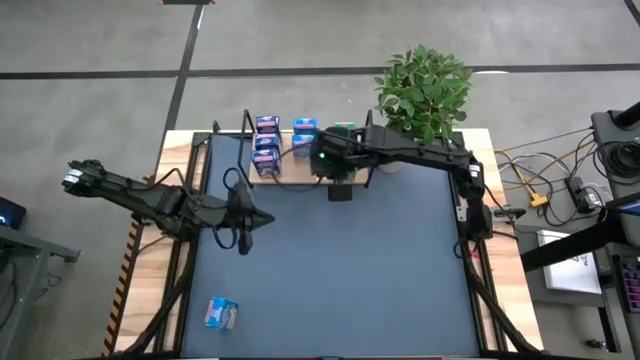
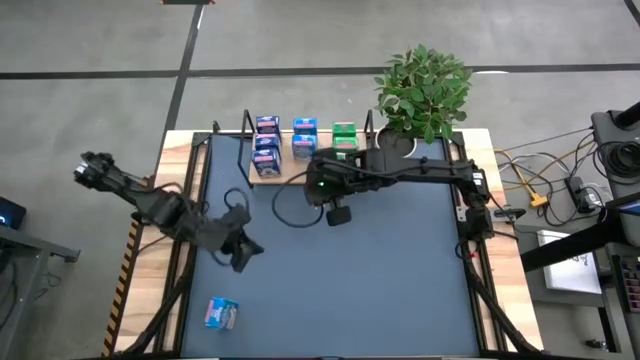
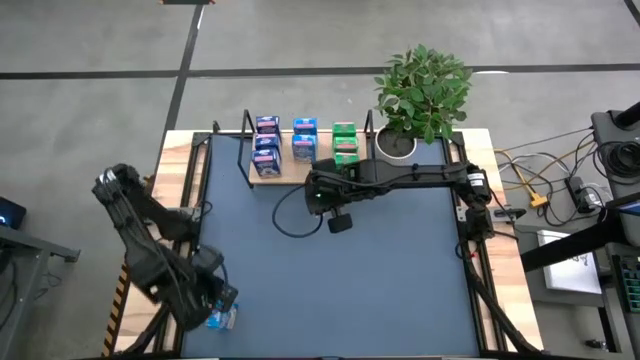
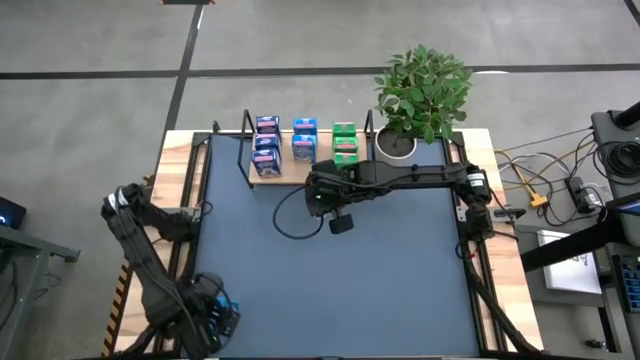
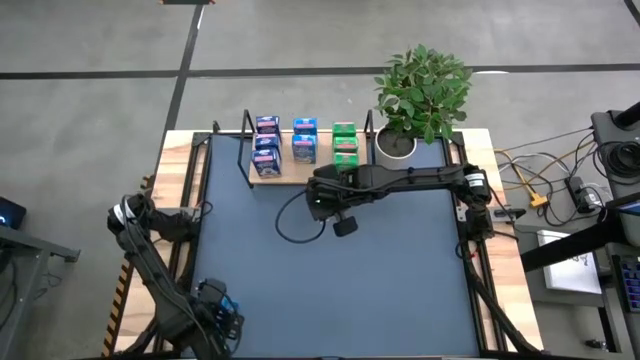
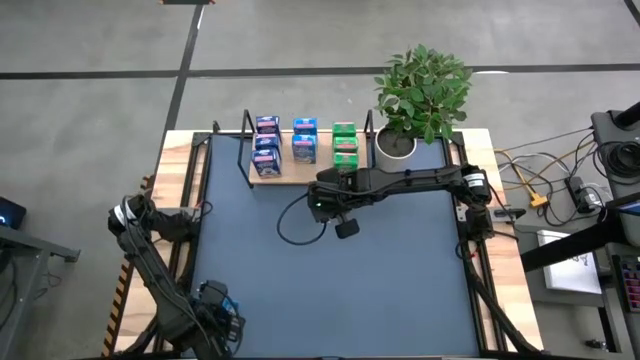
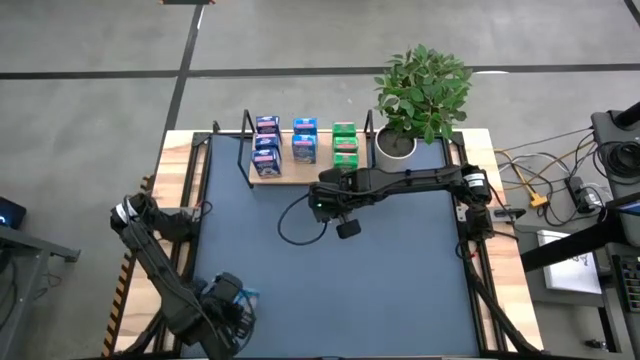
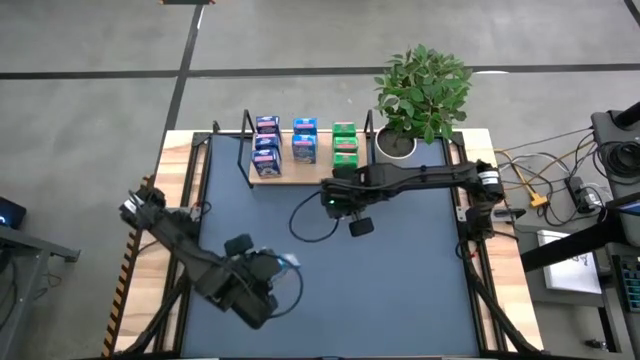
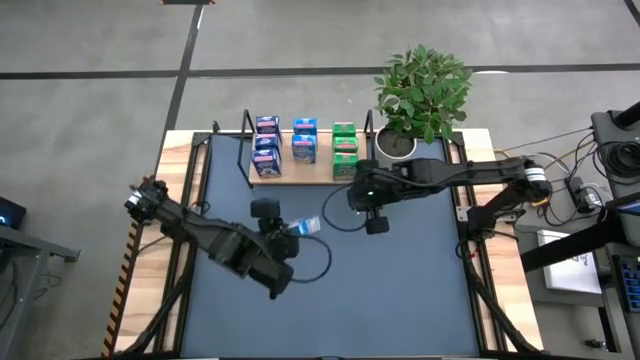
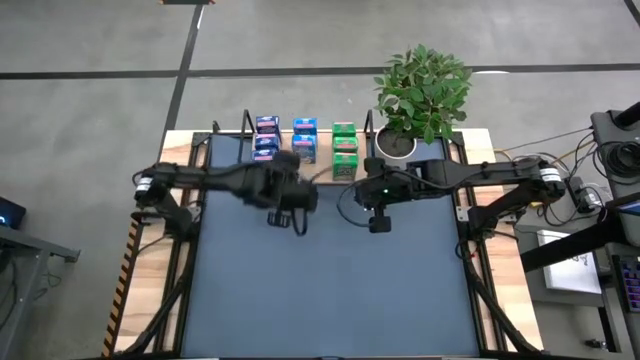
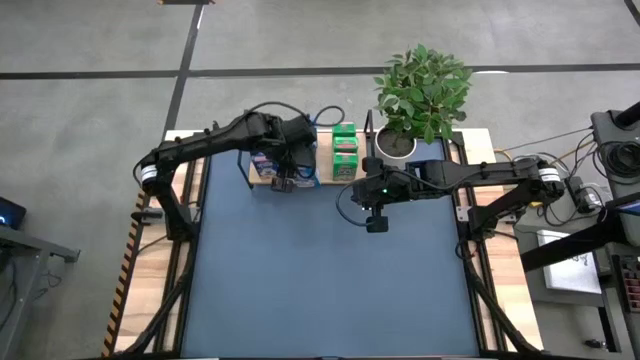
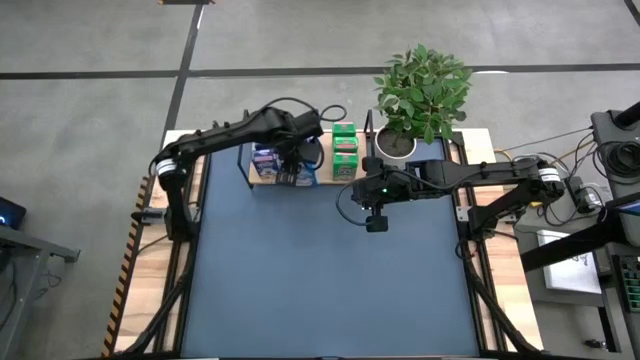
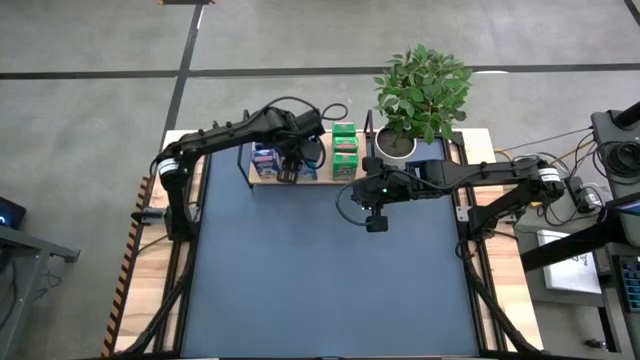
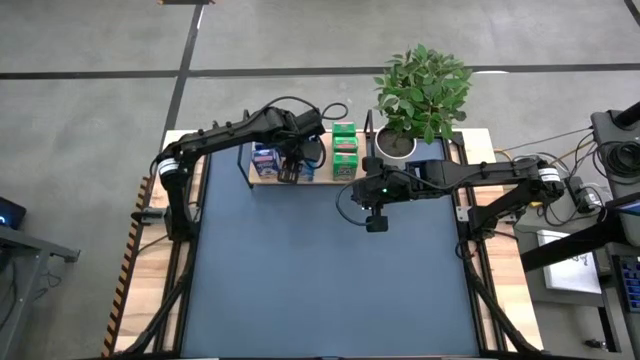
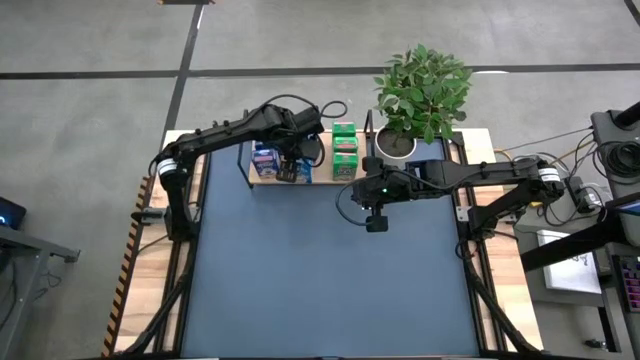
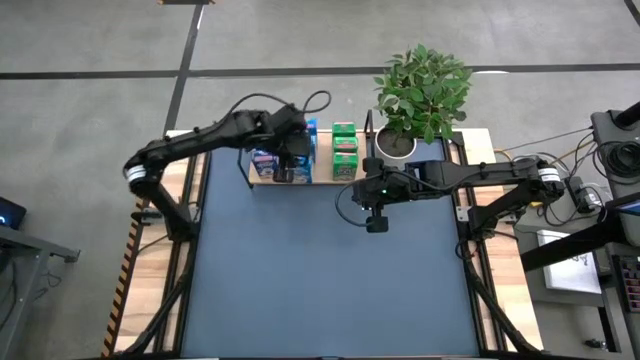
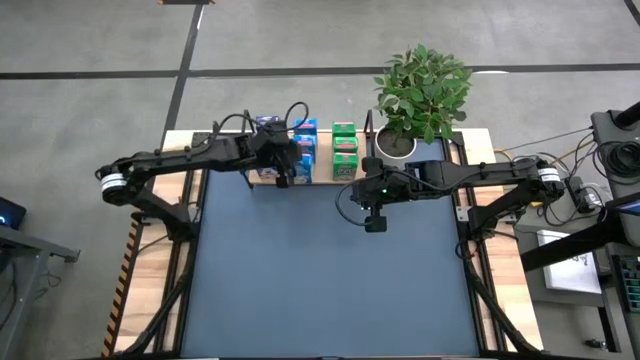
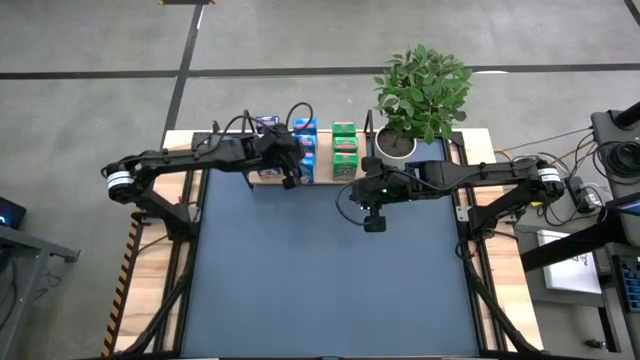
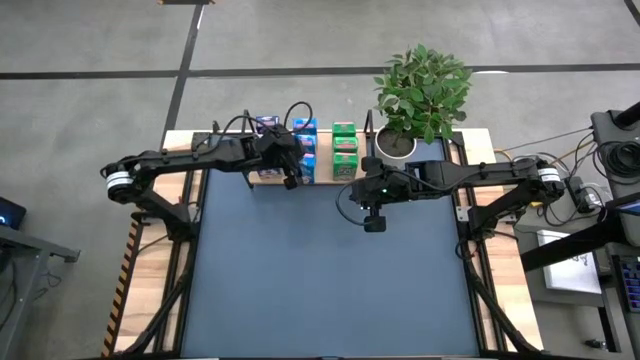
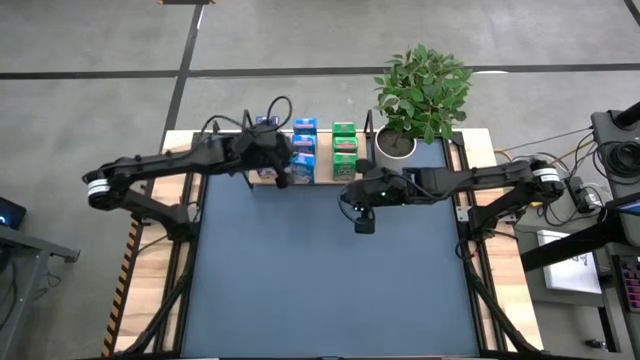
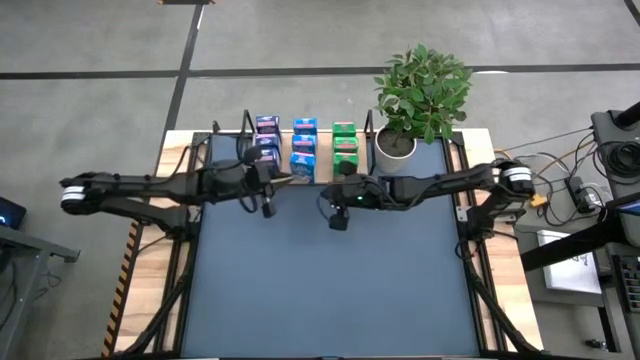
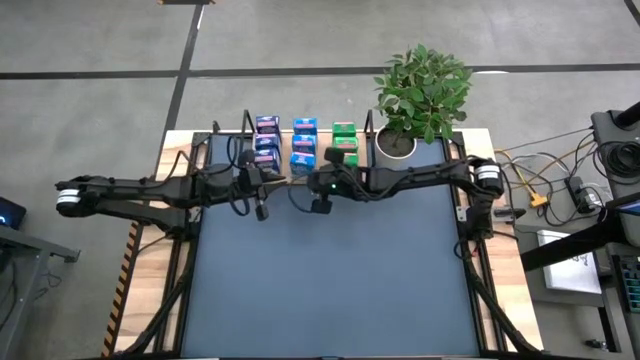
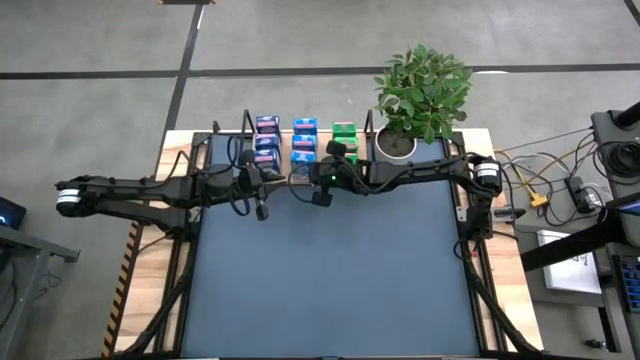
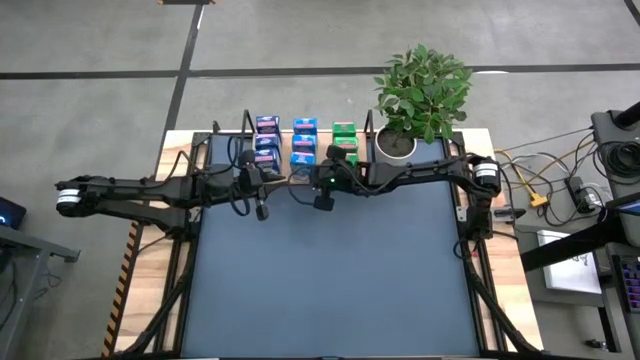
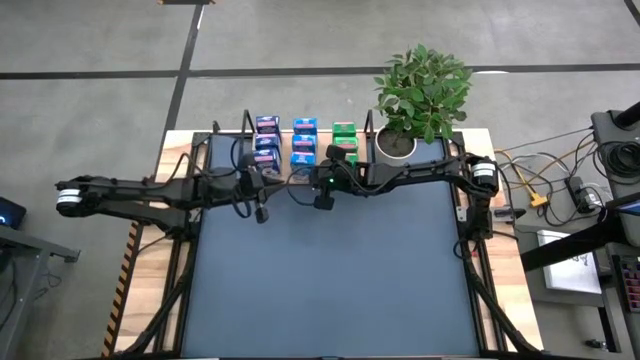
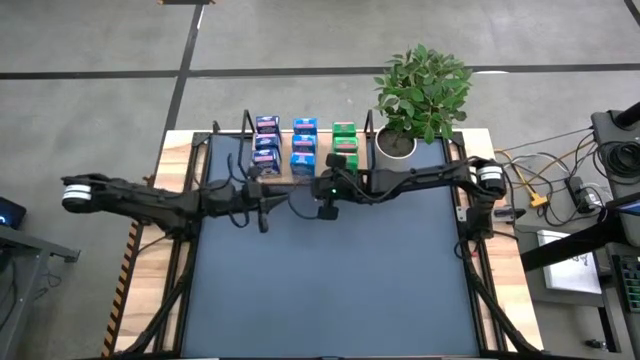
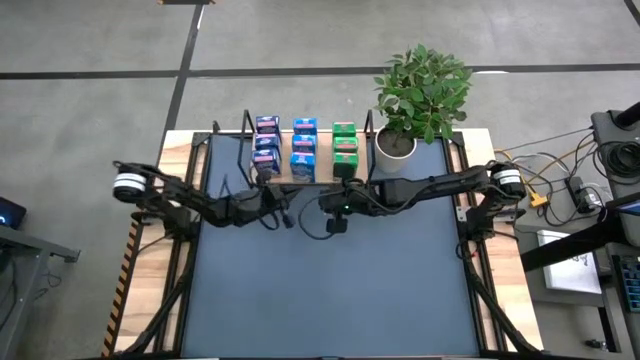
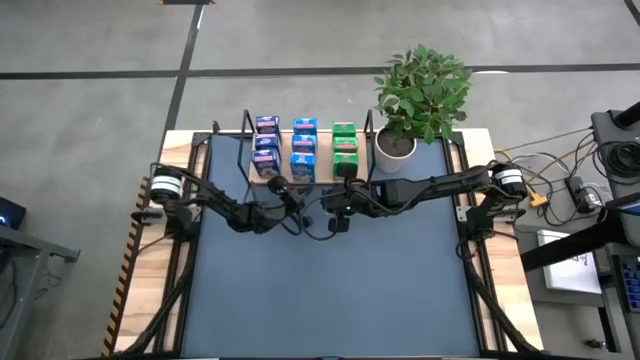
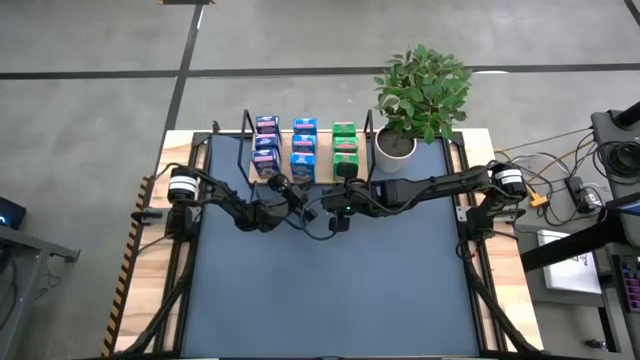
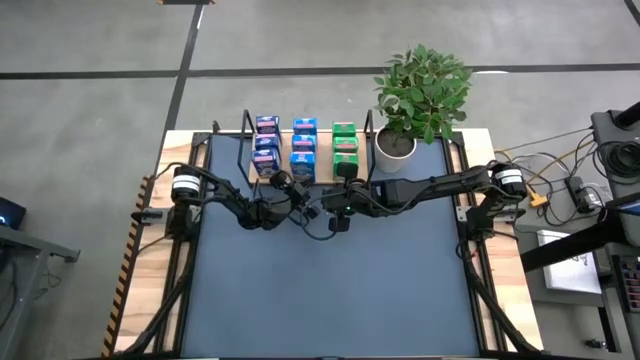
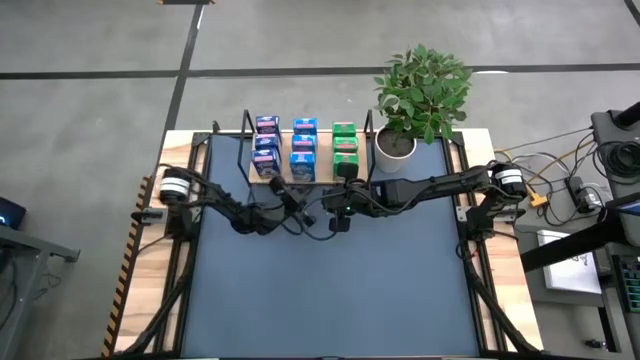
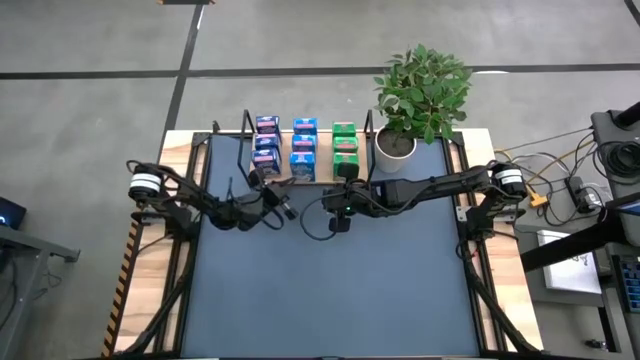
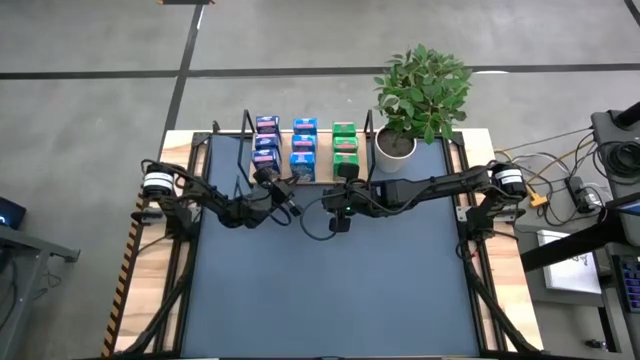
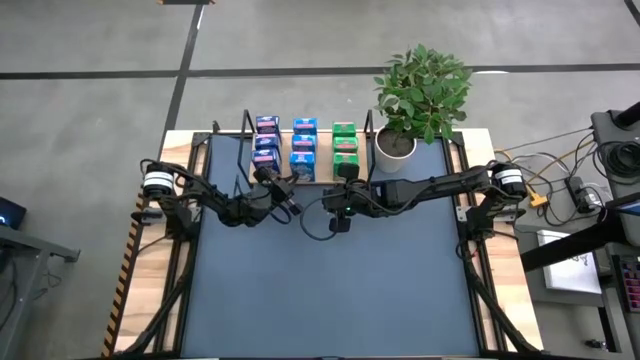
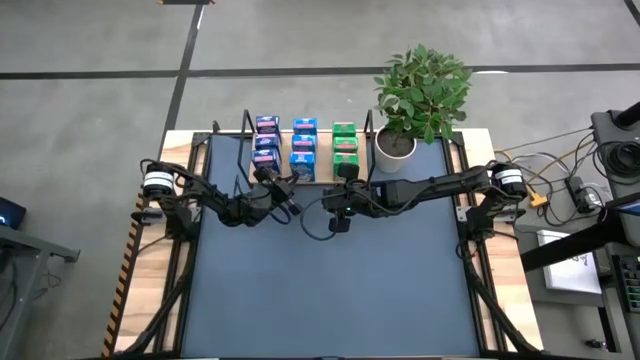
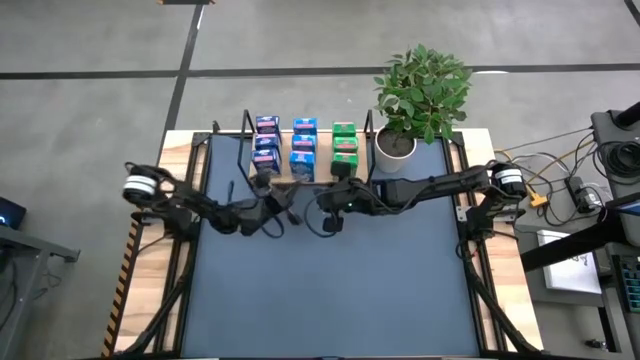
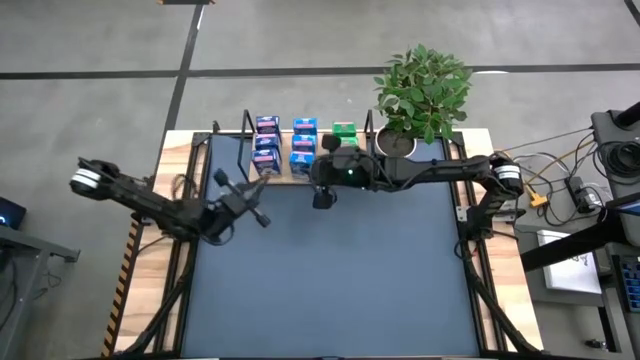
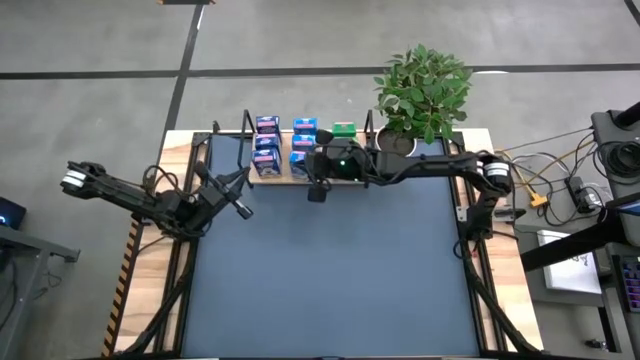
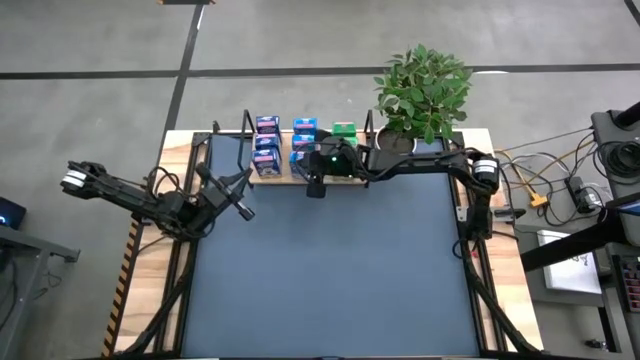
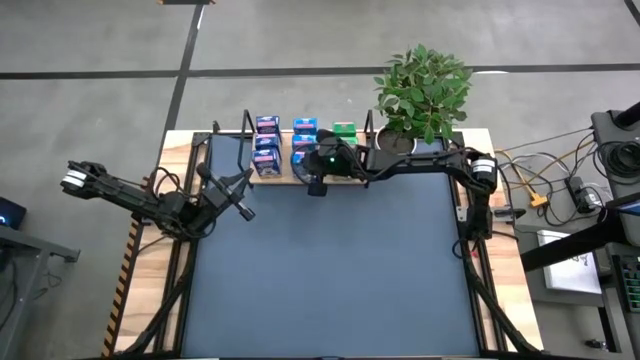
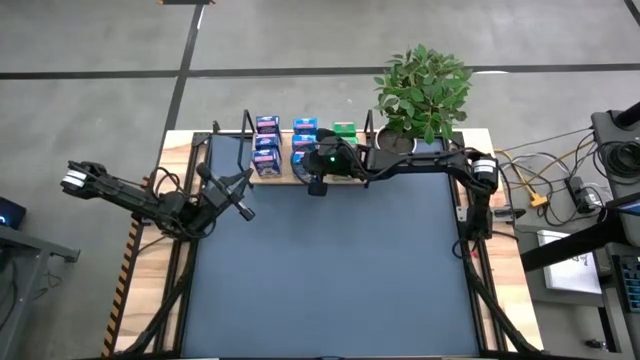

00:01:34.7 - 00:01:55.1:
Task: Stack cereal on shelf
Put the light blue cereal box on the shelf aligned with the other light blue cereal boxes
